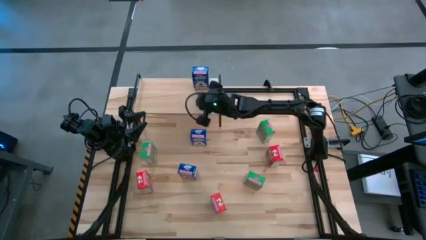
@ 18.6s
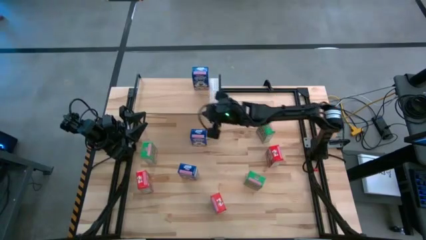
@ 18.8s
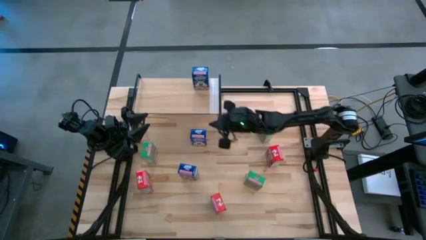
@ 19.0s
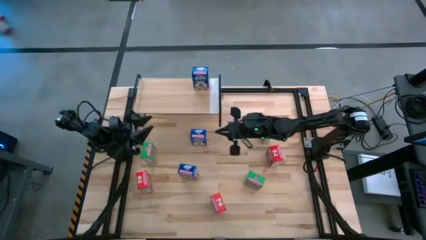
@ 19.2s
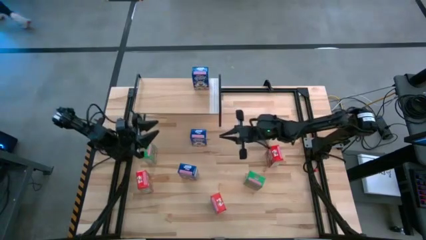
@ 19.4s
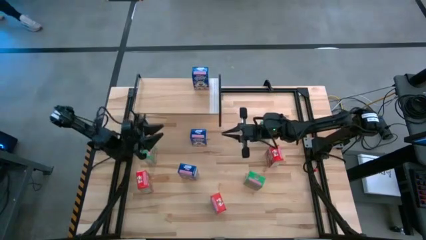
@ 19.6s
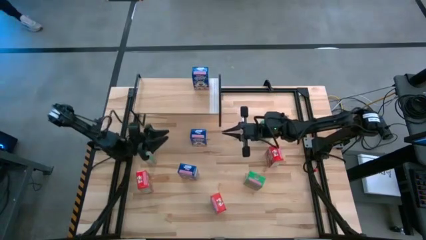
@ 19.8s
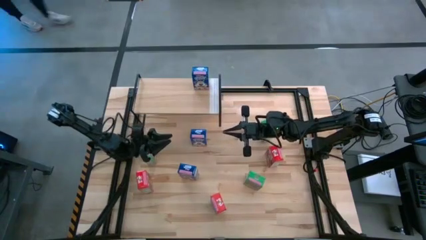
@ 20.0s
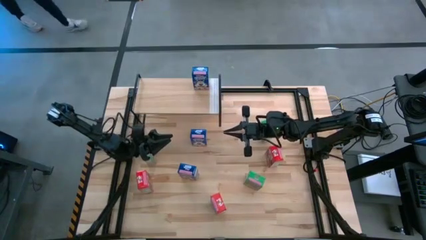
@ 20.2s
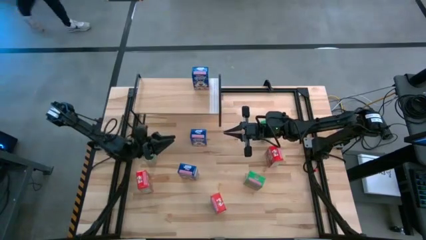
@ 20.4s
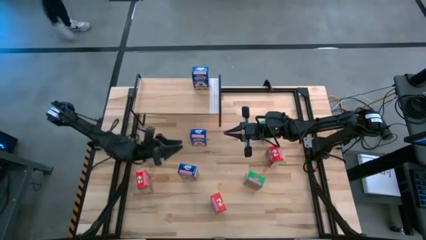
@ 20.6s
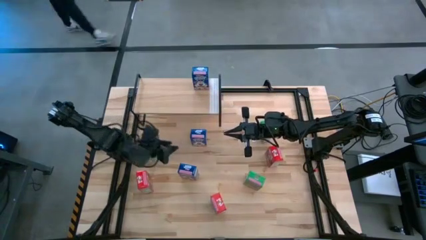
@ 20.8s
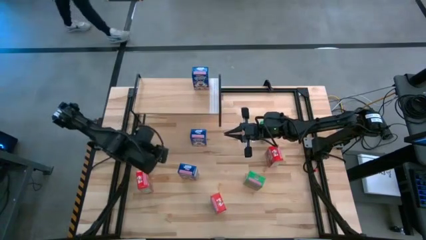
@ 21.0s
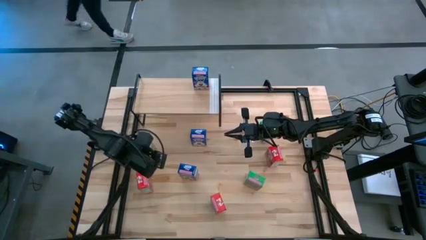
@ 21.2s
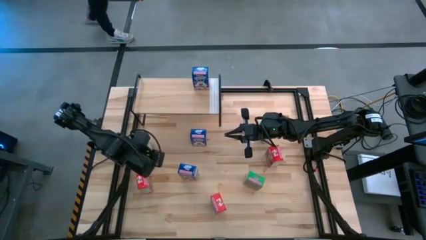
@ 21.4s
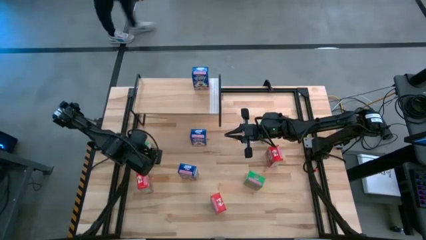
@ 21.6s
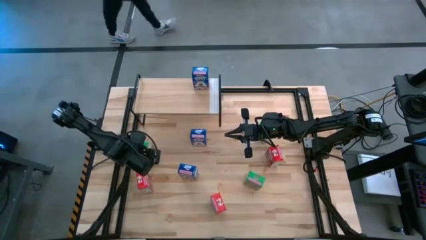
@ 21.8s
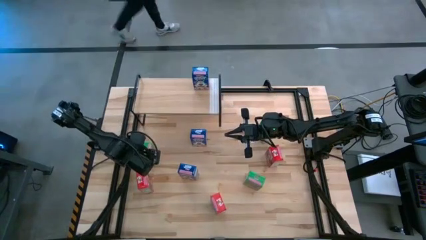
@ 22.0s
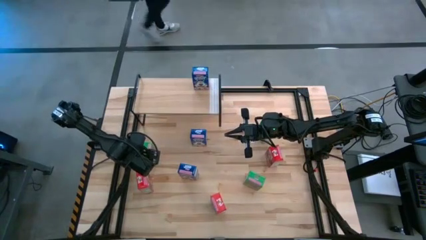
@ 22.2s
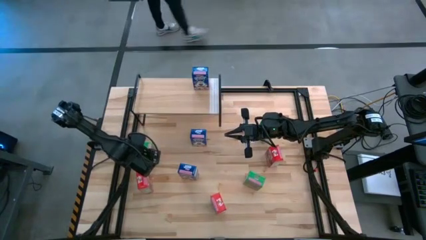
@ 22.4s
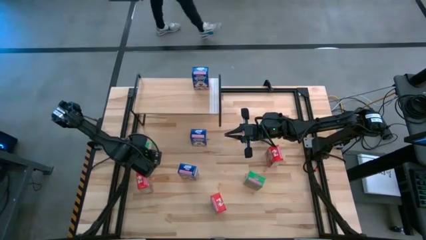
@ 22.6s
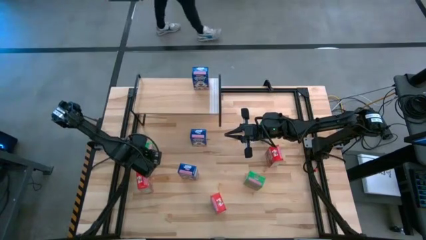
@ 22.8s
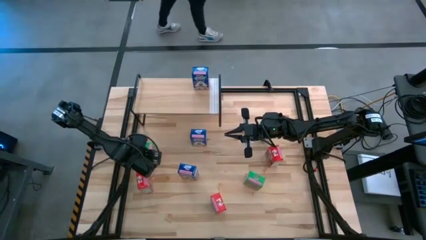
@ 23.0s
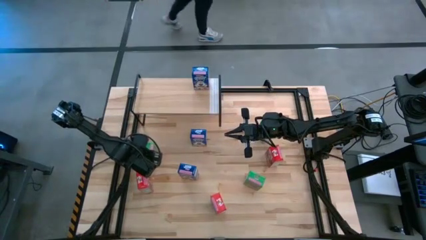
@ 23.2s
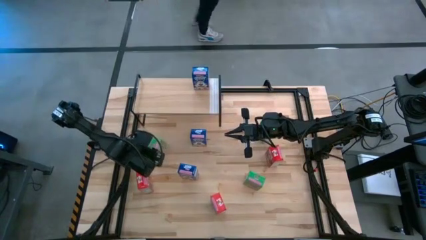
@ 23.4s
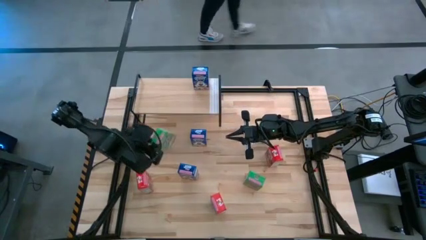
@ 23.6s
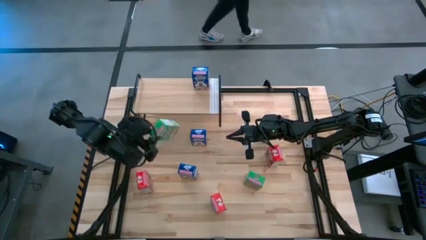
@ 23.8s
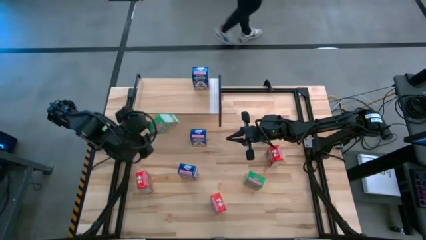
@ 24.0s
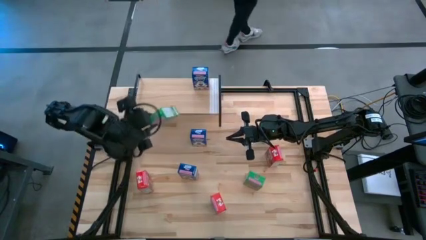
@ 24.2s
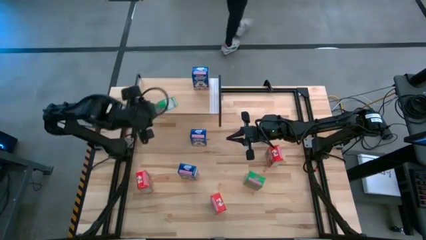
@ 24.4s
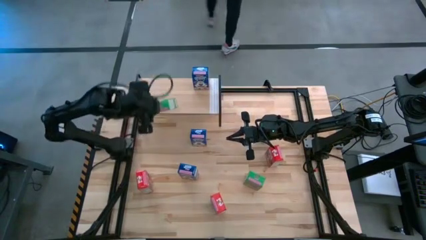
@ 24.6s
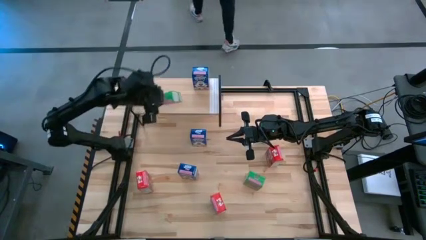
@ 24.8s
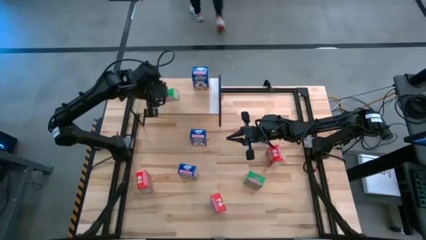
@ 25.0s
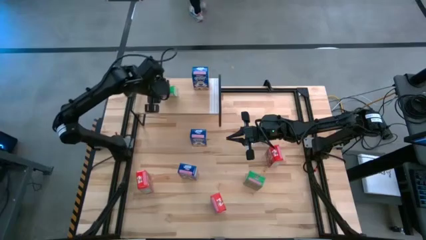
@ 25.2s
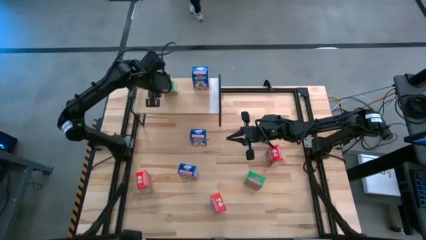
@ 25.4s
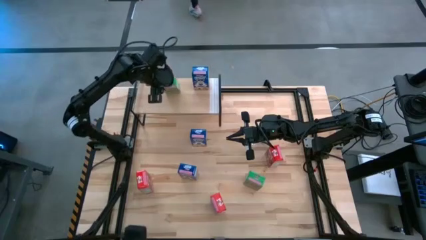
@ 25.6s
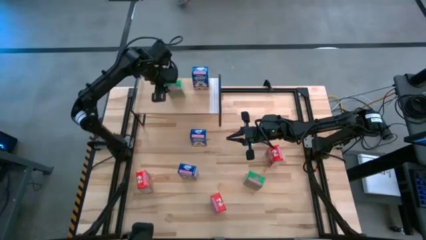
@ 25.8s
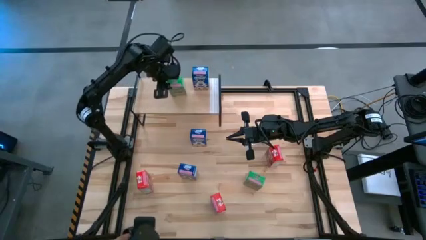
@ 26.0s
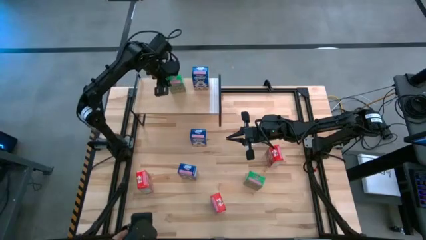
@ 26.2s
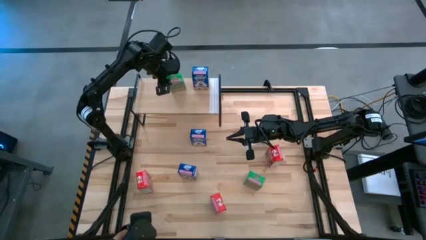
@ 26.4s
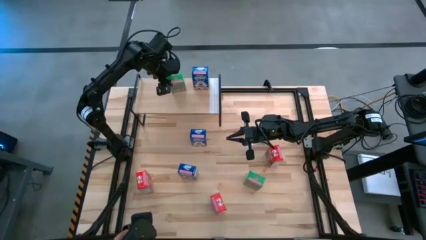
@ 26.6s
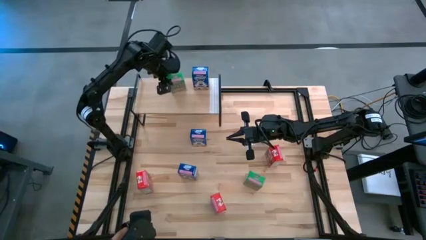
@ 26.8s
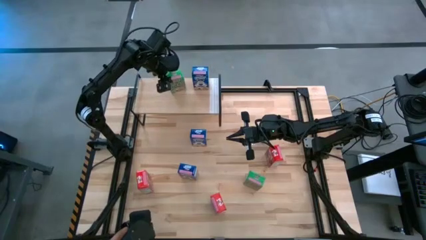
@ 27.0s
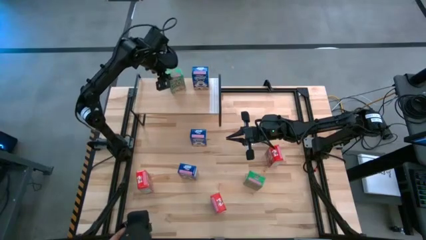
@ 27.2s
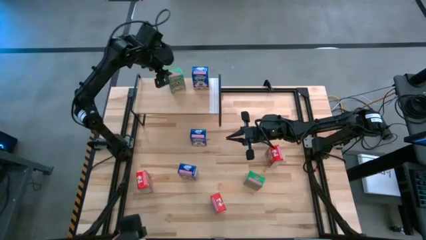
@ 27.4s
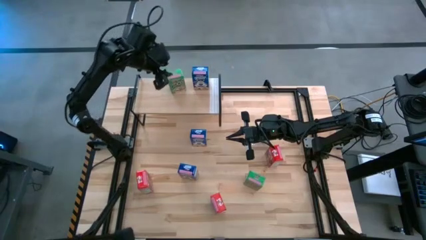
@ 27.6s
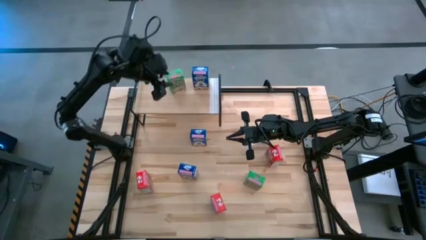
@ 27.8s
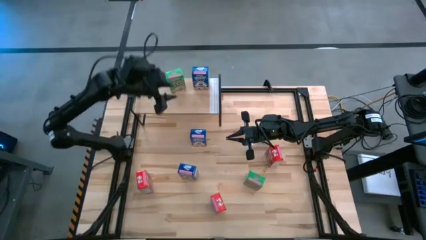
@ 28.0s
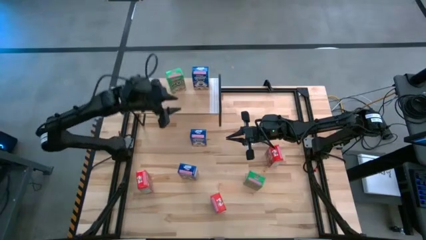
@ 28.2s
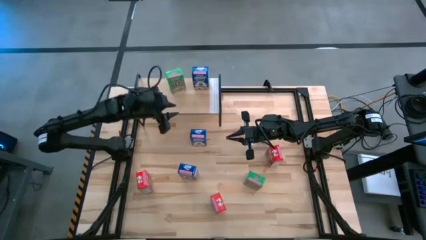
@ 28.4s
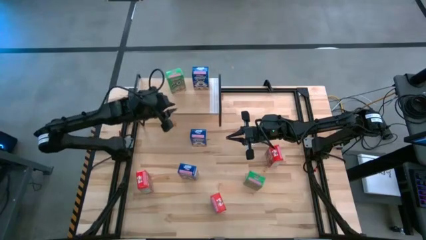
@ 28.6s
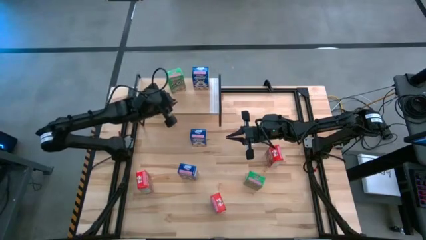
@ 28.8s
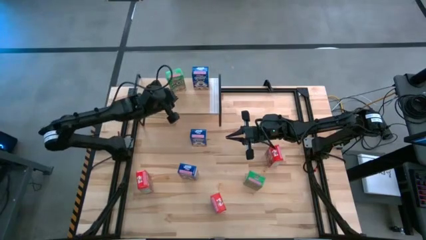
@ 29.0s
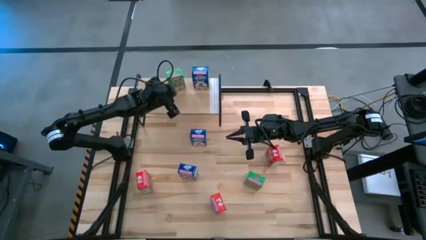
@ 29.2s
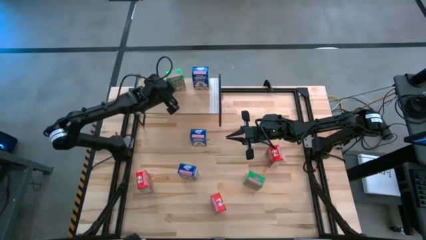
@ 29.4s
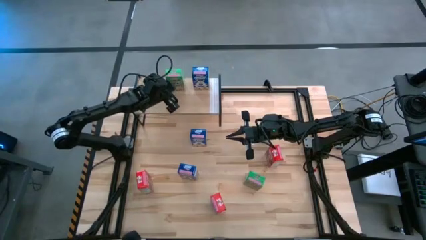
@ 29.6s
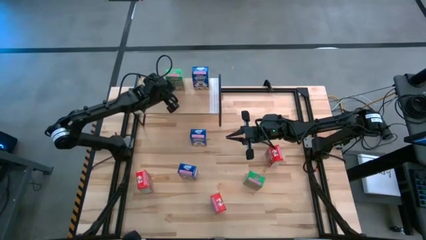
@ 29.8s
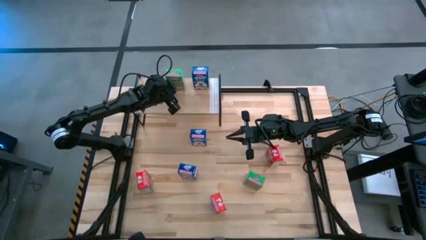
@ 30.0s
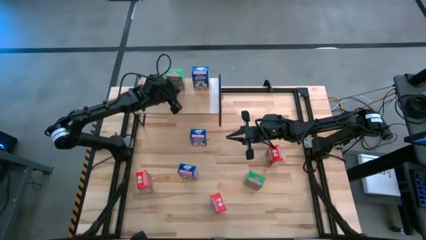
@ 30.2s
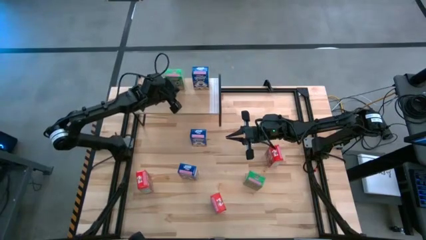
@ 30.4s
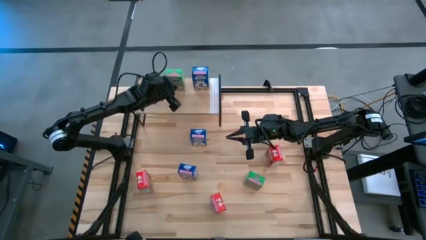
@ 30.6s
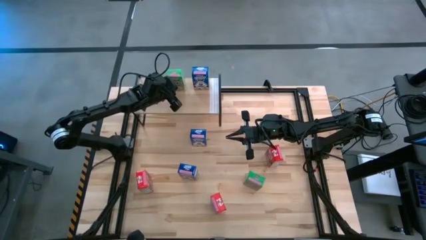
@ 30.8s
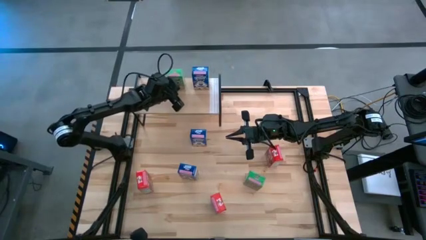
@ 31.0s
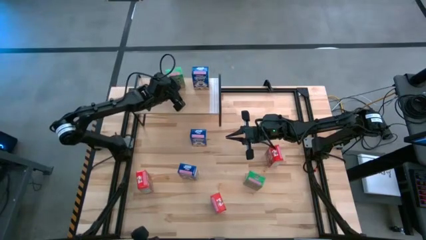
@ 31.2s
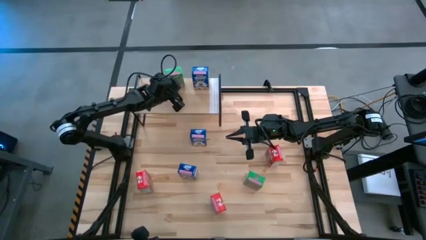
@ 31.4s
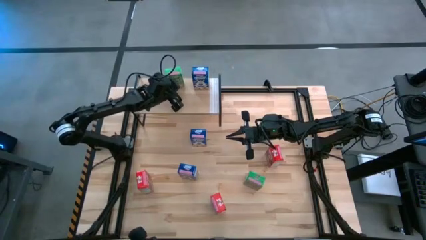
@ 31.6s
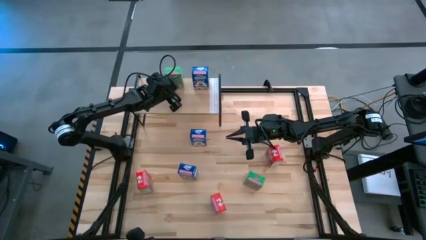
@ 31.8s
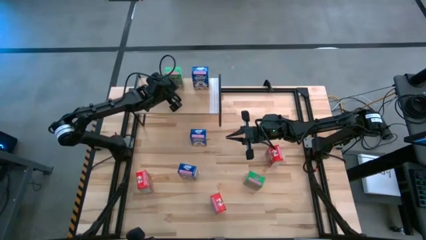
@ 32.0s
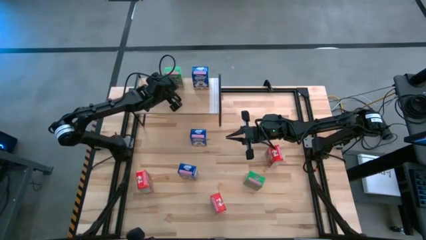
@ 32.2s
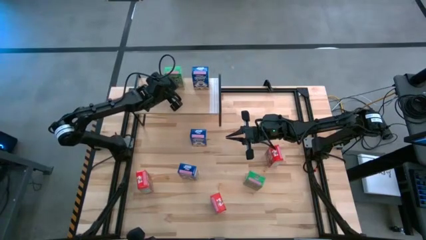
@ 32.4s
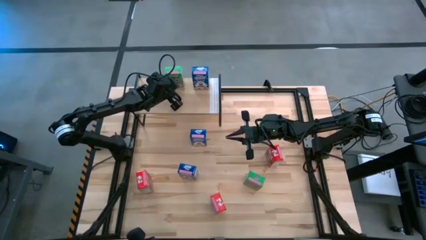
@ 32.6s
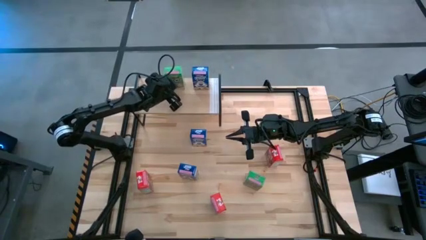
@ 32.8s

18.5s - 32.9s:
Task: Stack cereal on shelf
Put the middle left green cereal box on the shelf

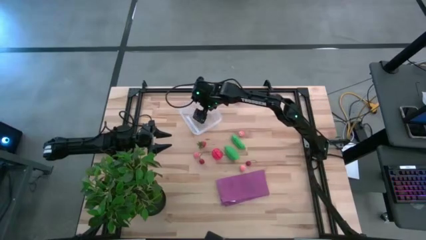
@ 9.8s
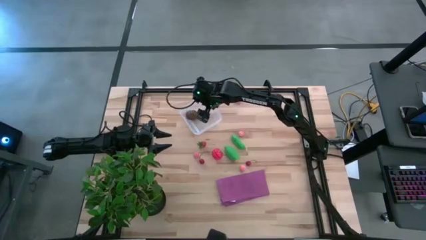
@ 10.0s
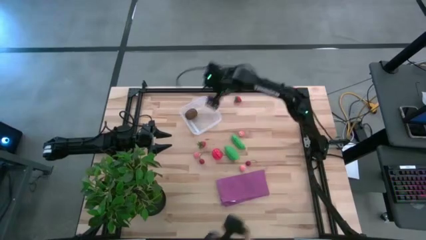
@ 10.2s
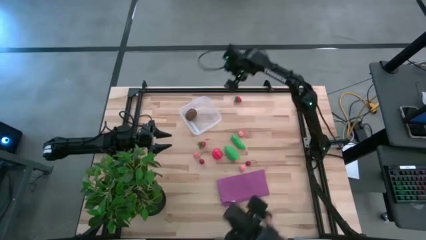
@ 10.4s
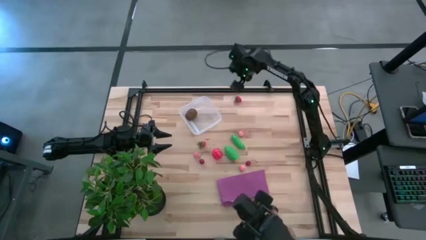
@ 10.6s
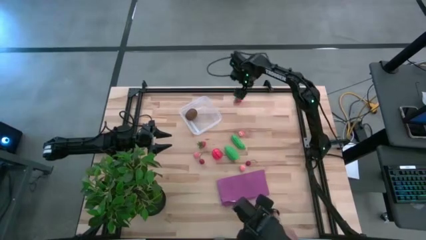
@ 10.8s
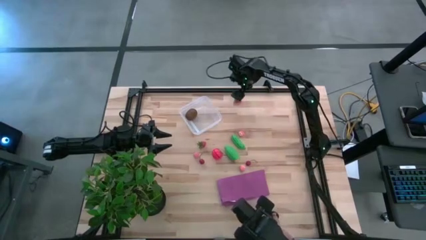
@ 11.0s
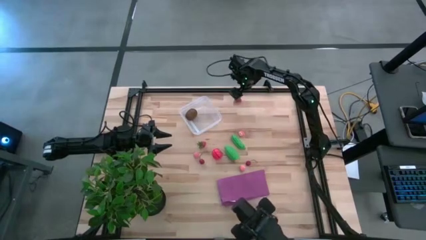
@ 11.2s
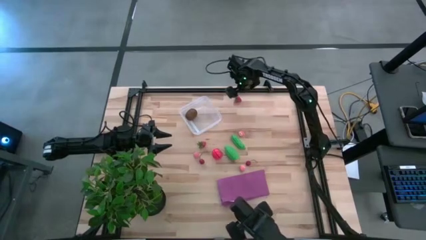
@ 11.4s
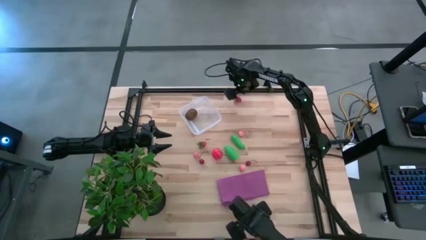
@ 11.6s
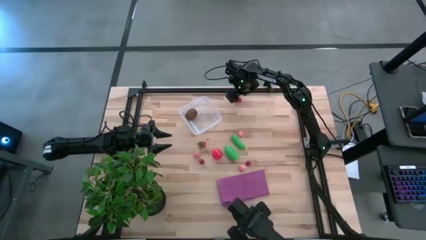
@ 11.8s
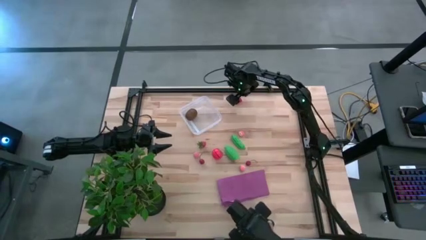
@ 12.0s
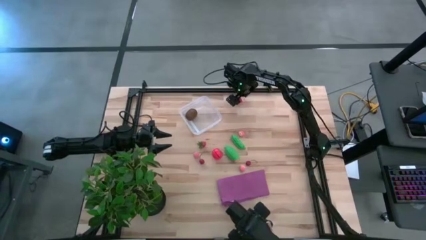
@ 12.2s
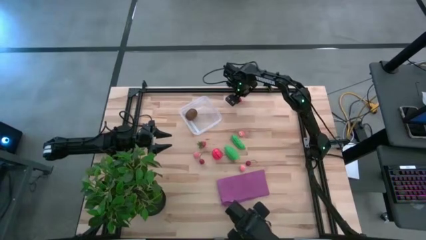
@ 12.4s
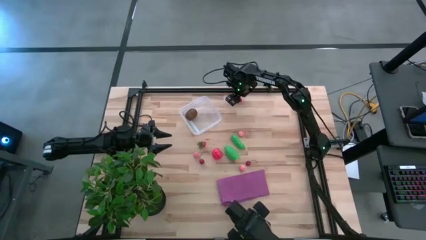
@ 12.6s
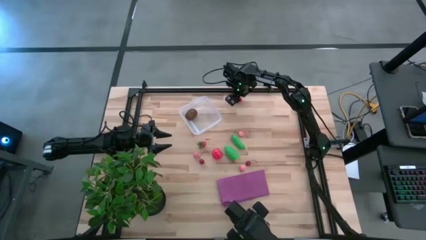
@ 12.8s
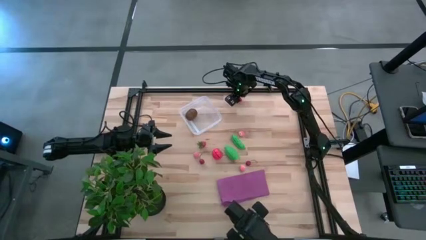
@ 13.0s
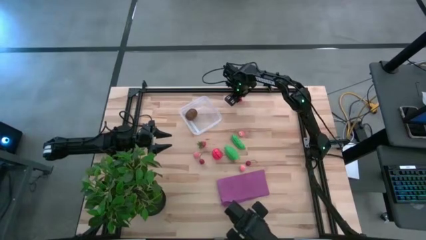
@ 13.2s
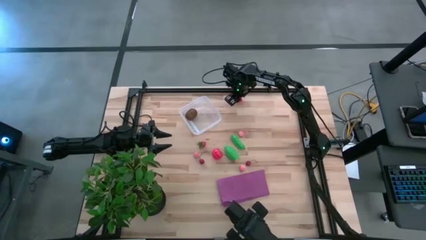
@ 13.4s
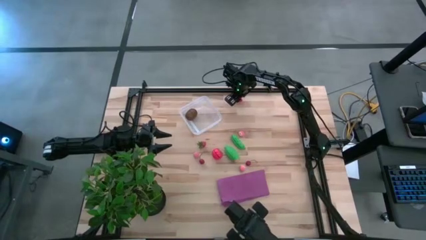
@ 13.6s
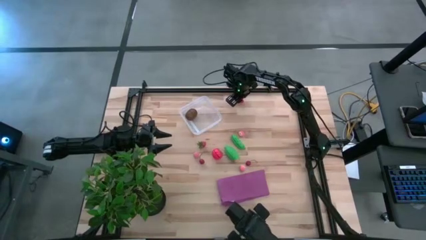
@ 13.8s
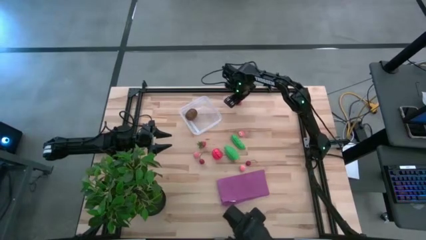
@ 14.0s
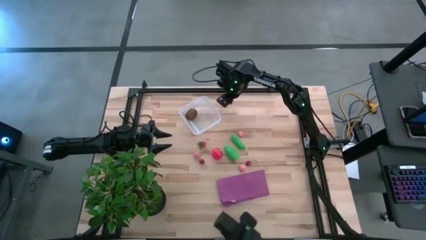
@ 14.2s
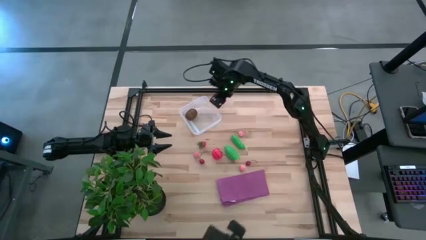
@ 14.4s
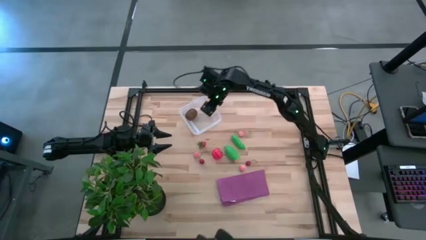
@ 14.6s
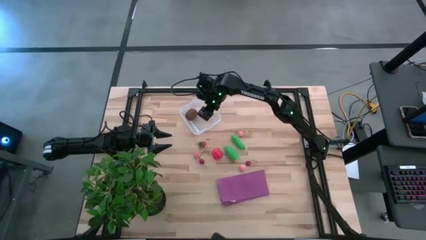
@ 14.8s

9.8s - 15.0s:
Task: Pick and placing Produce into tupperware
Put the top red strawberry into the transparent bin
